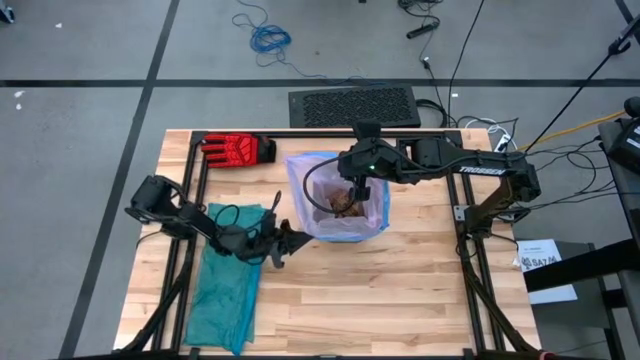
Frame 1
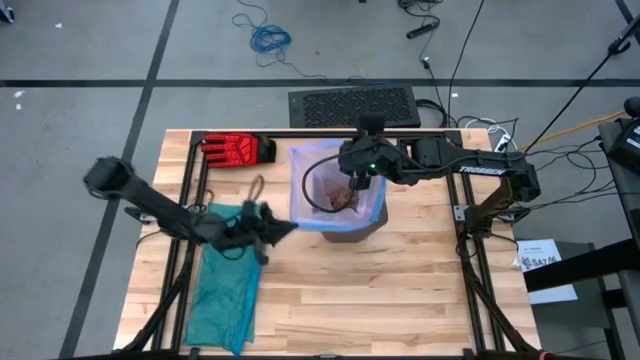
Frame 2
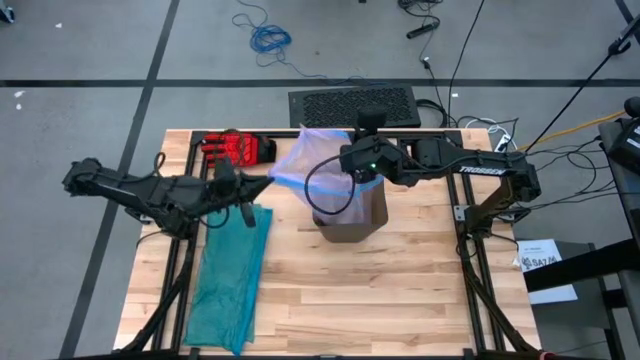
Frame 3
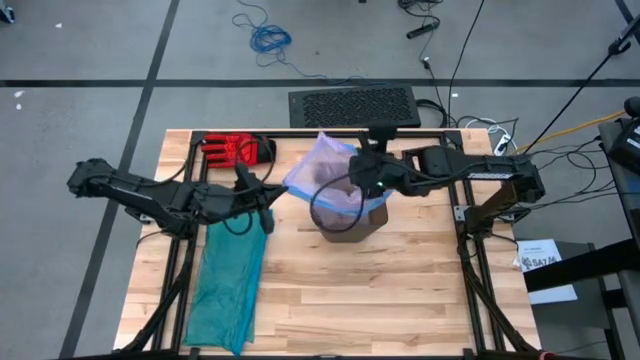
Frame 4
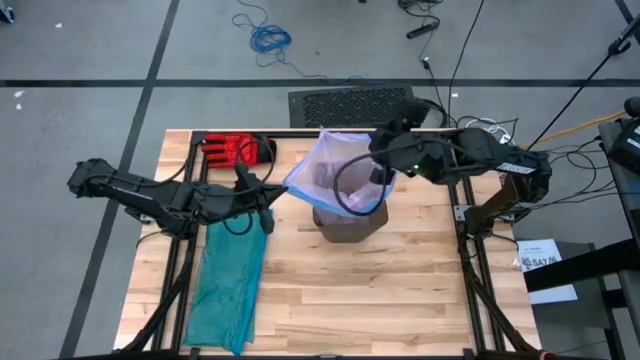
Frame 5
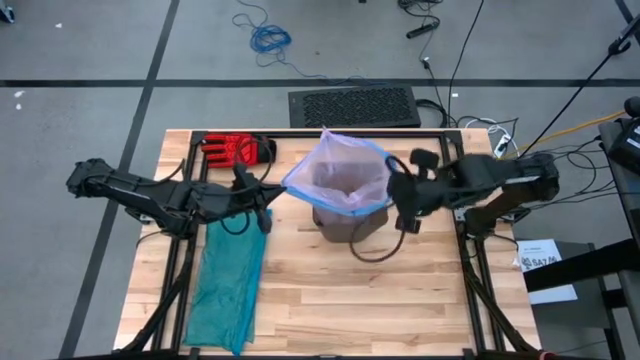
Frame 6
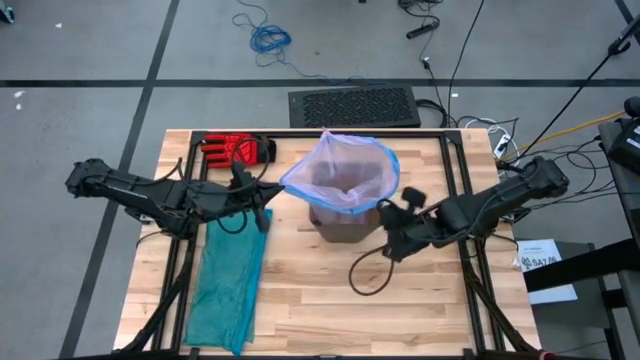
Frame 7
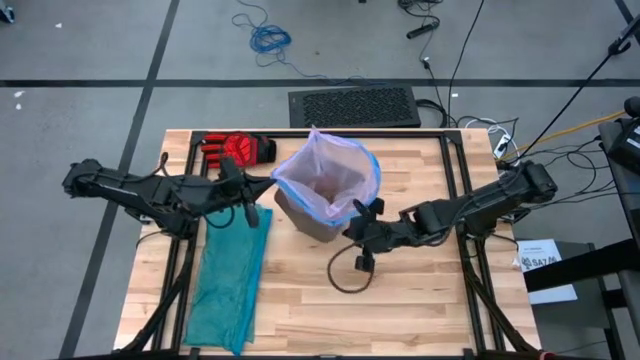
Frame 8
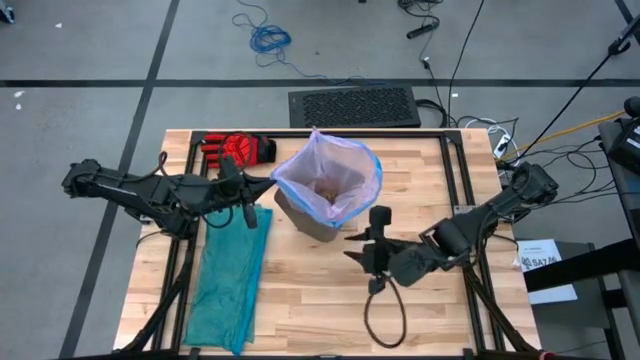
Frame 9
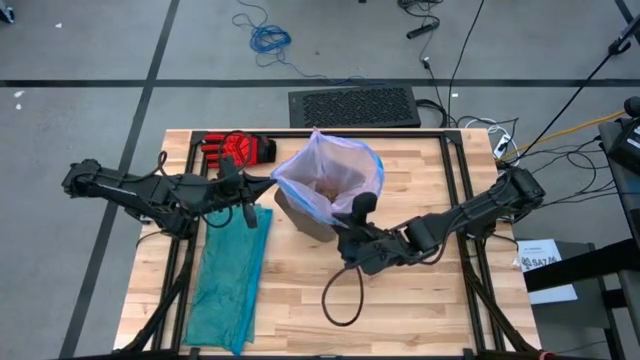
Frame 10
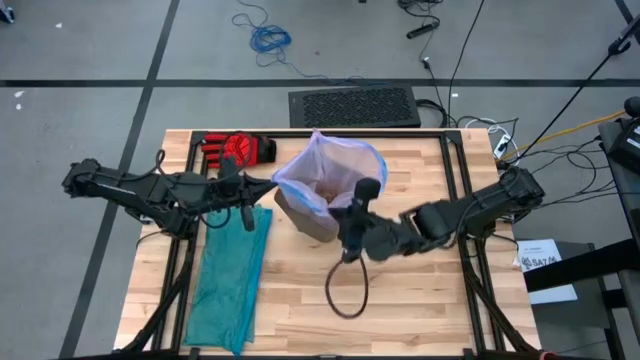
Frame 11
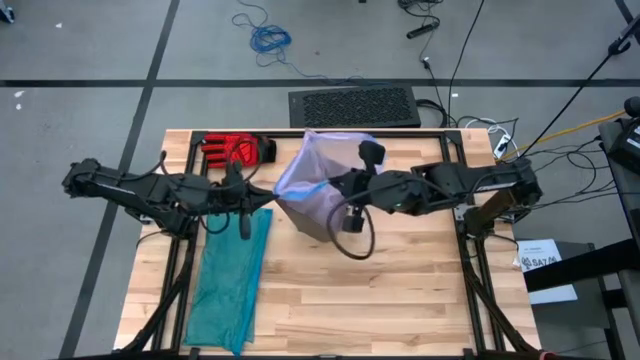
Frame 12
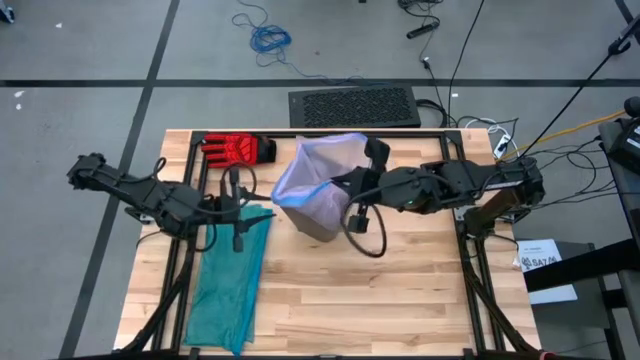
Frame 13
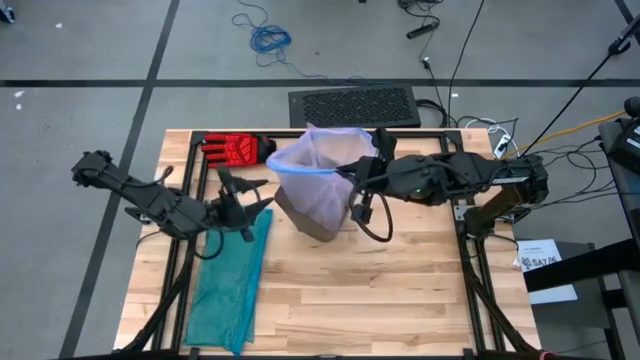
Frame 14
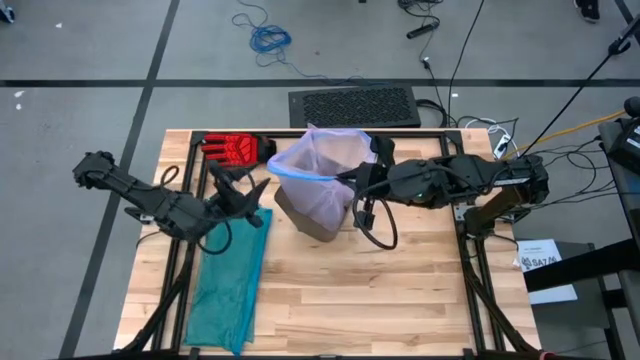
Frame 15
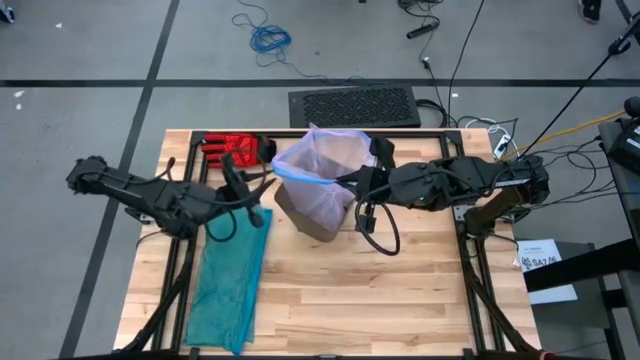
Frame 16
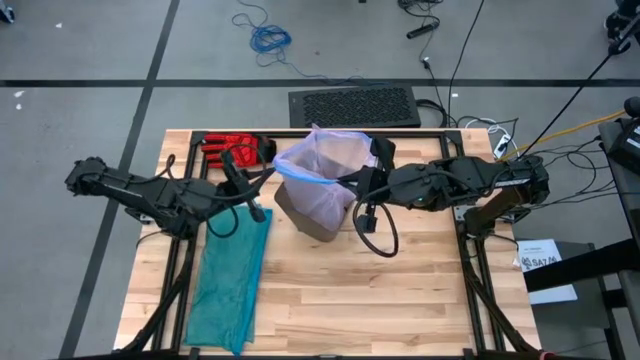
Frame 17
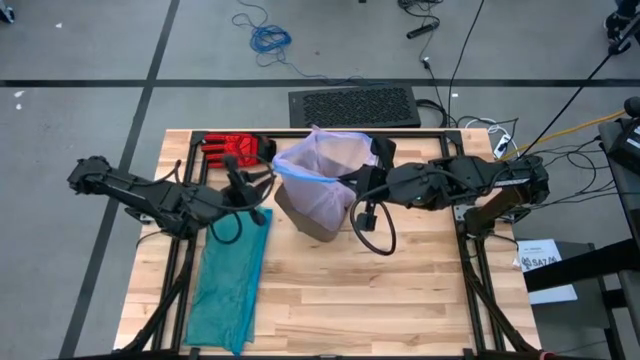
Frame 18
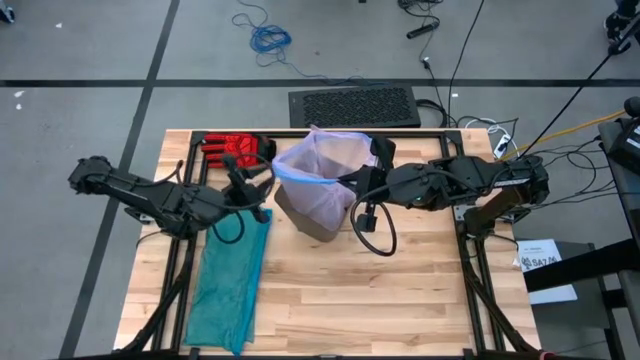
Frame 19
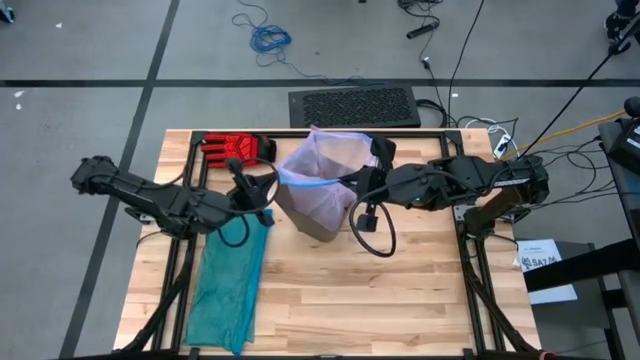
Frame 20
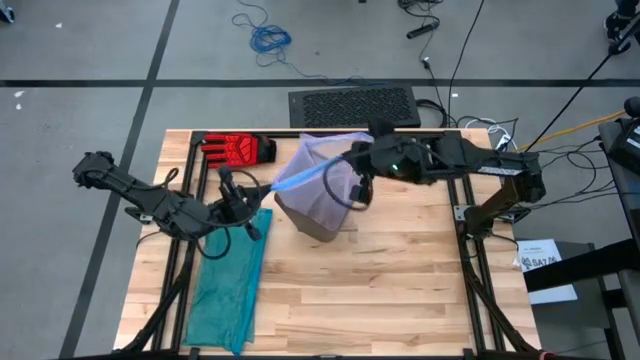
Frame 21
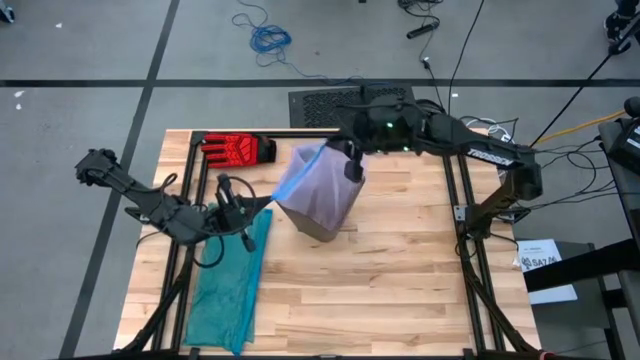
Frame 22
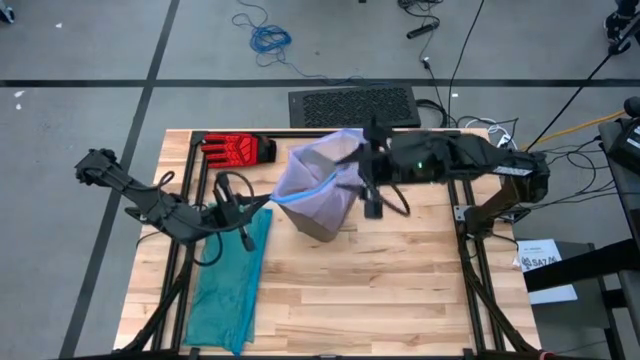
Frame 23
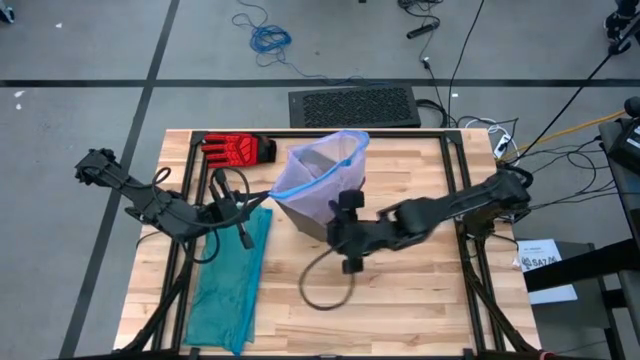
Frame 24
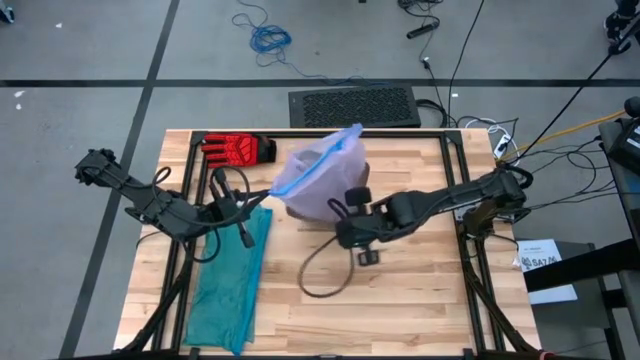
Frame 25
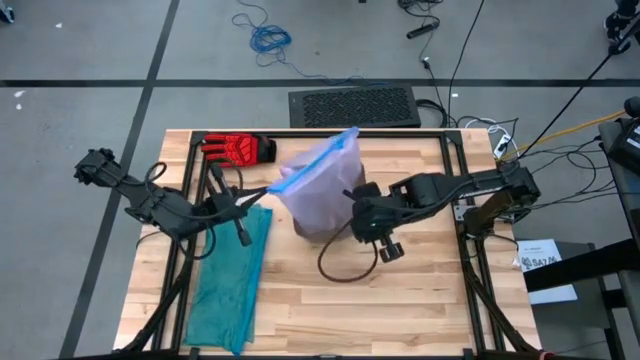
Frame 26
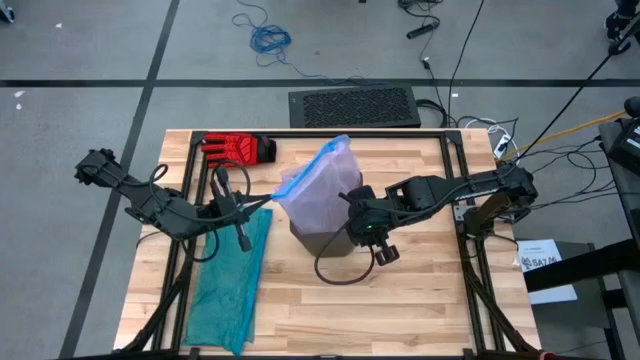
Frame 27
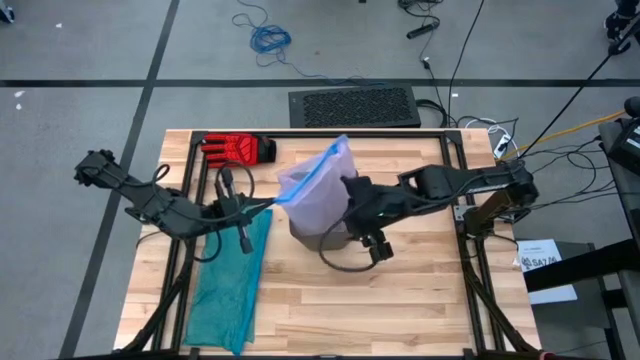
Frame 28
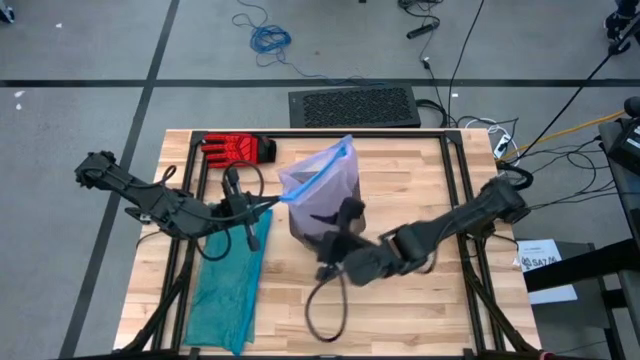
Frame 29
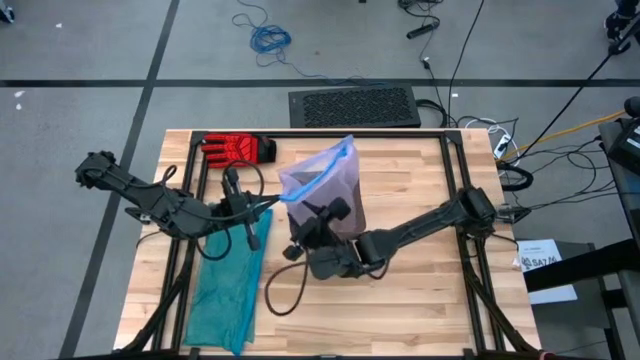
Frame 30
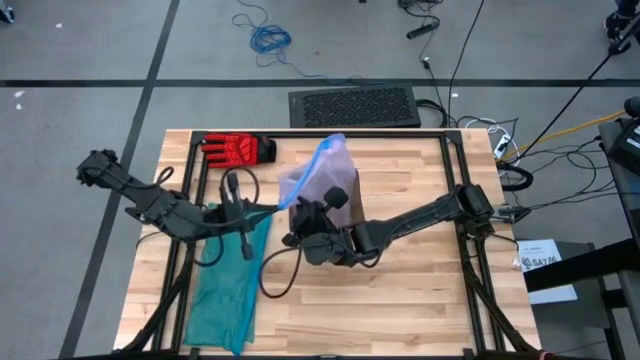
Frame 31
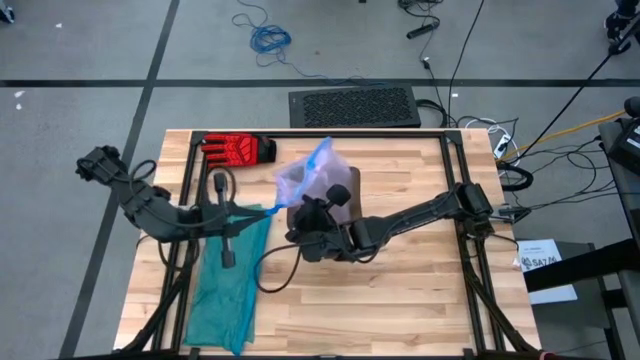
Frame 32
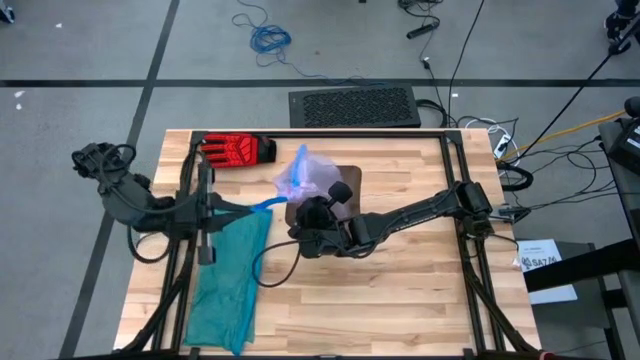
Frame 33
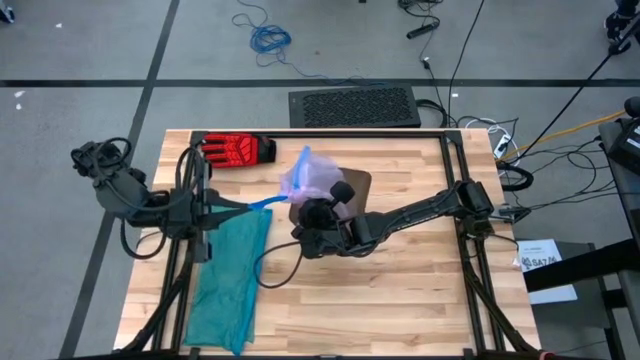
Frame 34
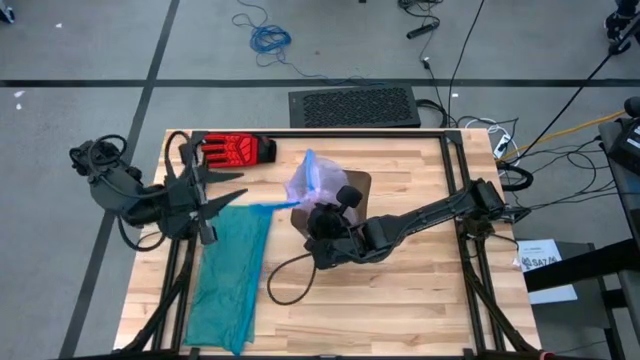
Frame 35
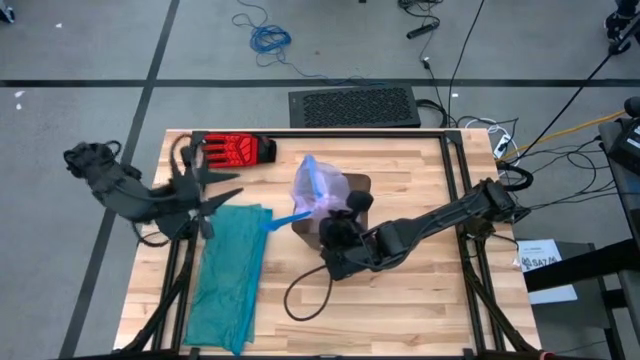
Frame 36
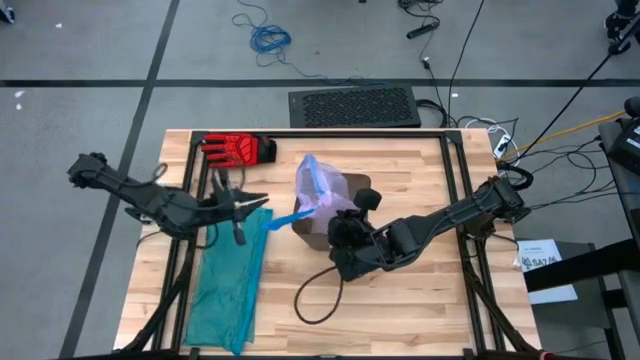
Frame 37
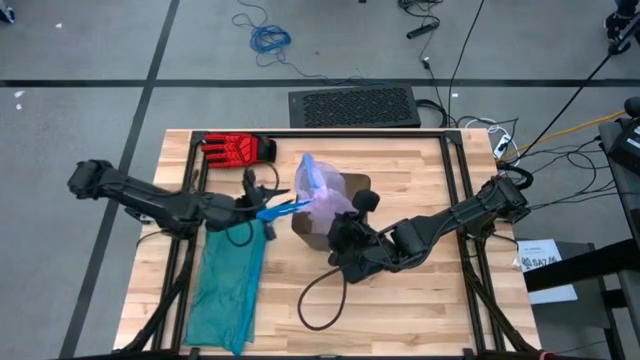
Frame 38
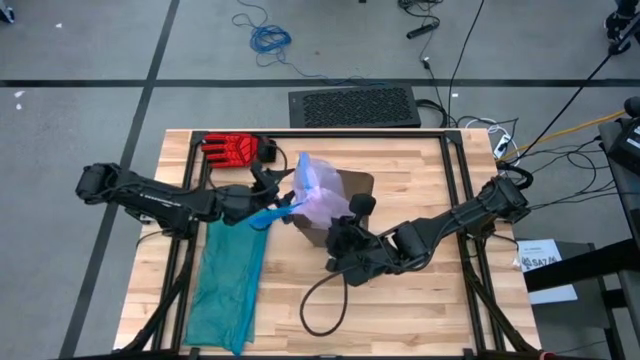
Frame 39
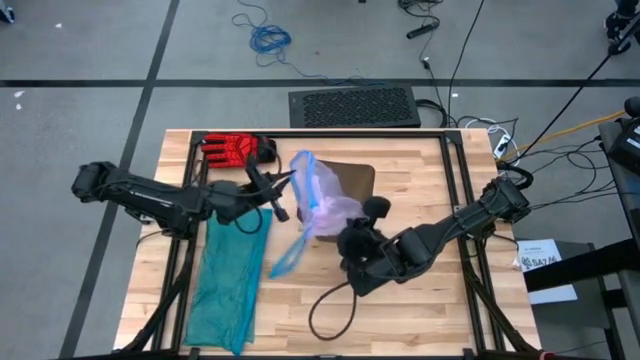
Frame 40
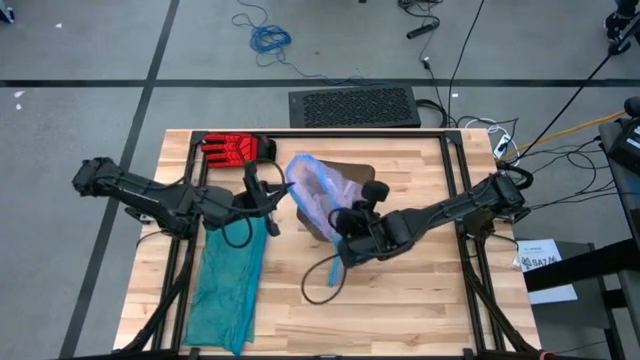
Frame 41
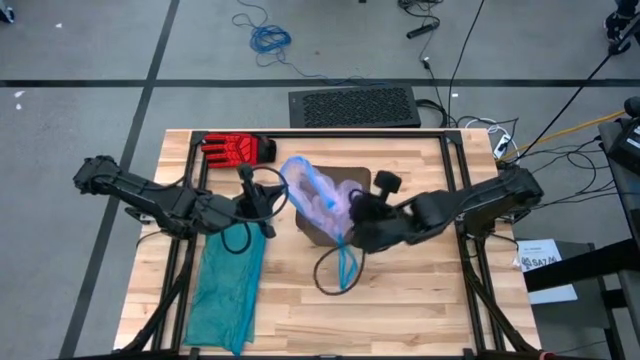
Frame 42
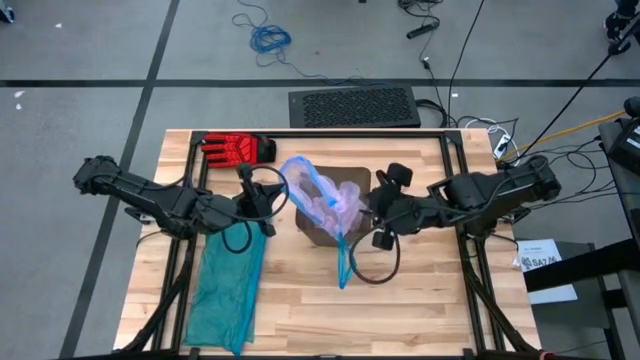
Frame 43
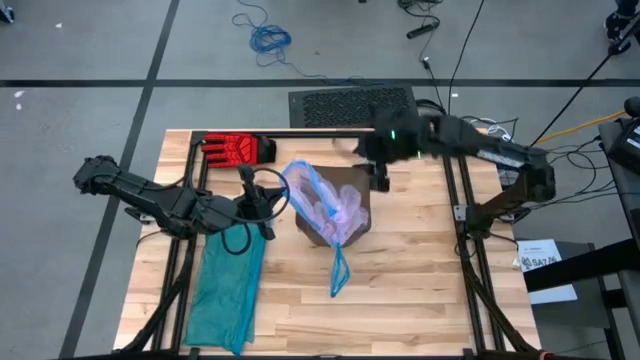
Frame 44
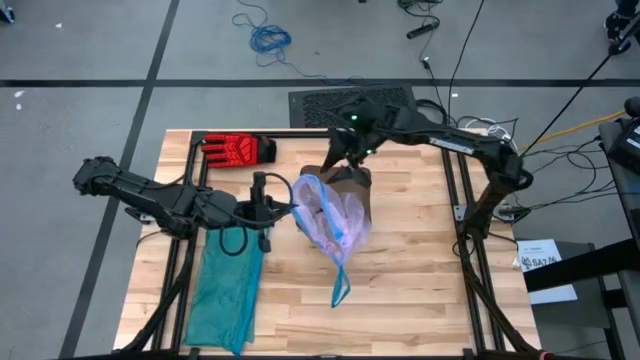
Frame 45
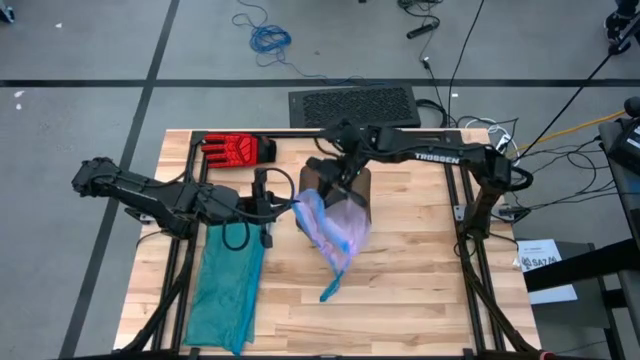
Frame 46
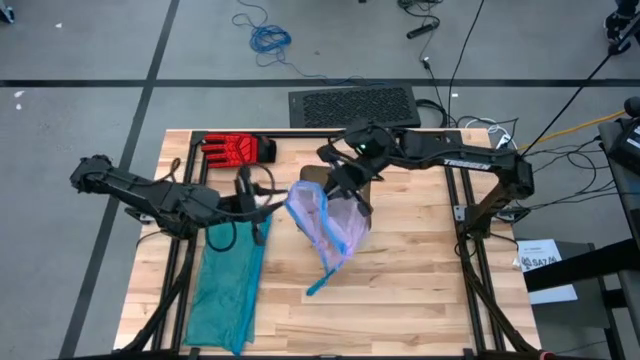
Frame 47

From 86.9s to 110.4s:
Task: place trash/remove bag and relplace
Remove the pink trash bag from the black trash bin
